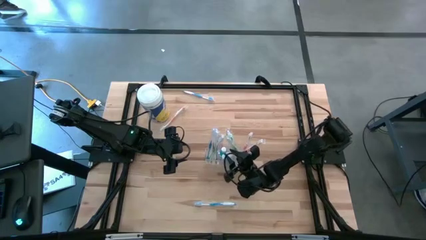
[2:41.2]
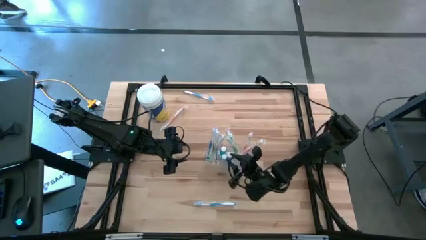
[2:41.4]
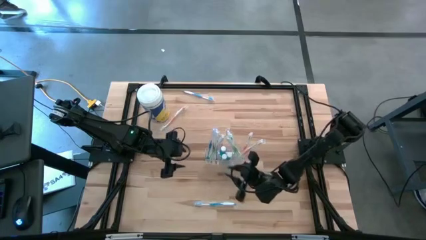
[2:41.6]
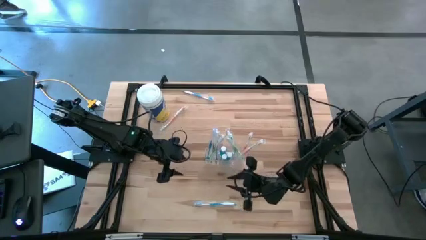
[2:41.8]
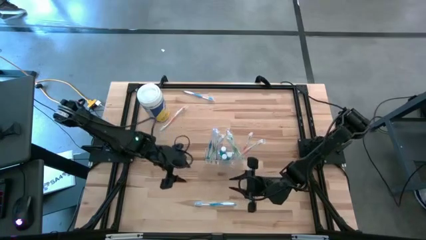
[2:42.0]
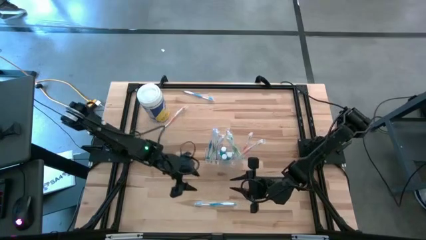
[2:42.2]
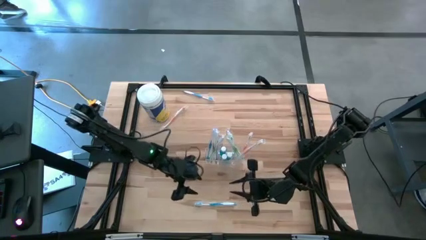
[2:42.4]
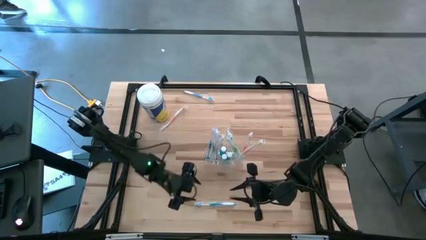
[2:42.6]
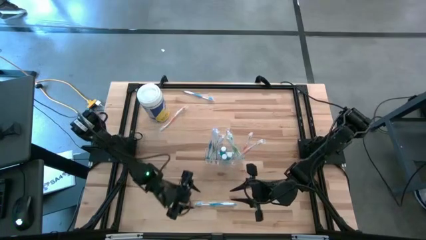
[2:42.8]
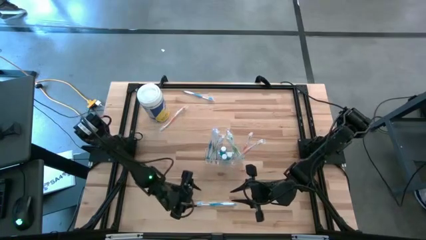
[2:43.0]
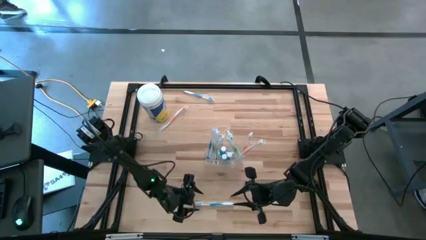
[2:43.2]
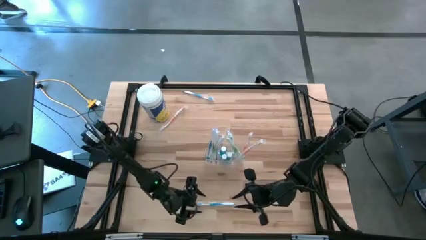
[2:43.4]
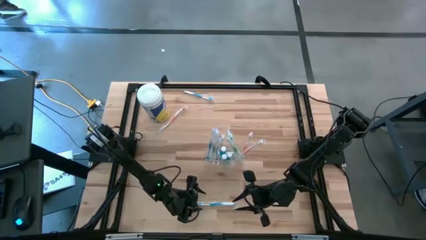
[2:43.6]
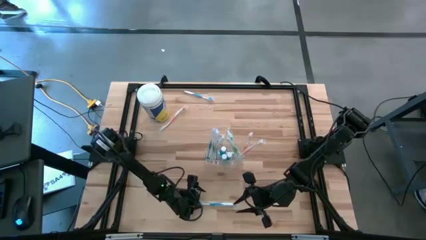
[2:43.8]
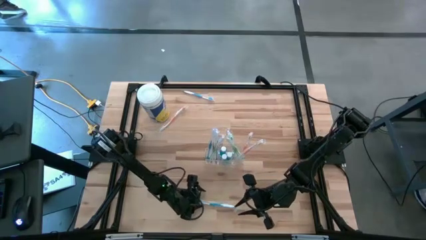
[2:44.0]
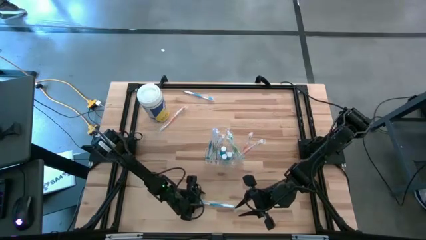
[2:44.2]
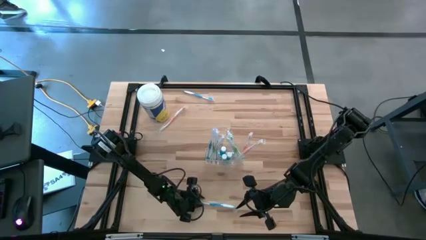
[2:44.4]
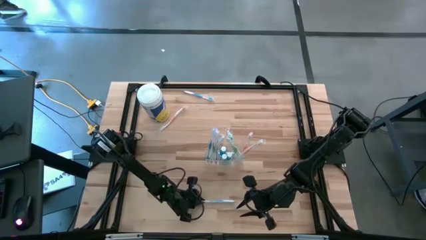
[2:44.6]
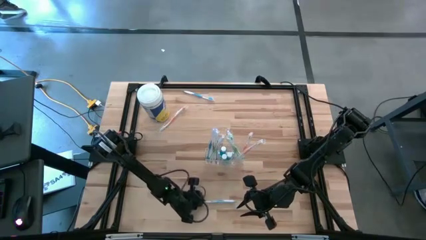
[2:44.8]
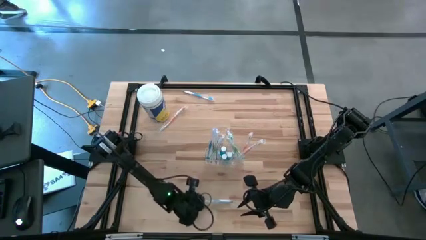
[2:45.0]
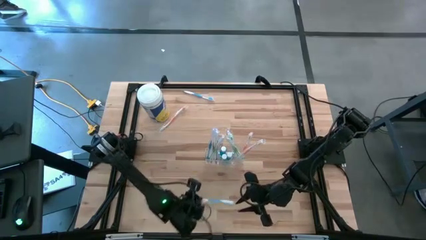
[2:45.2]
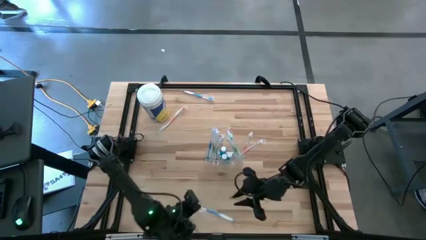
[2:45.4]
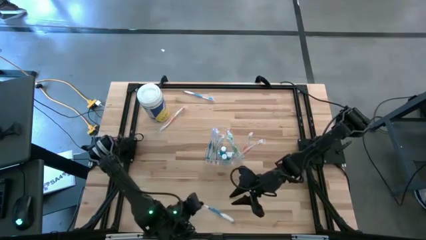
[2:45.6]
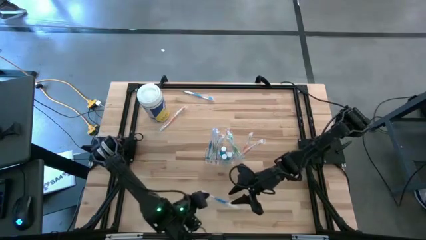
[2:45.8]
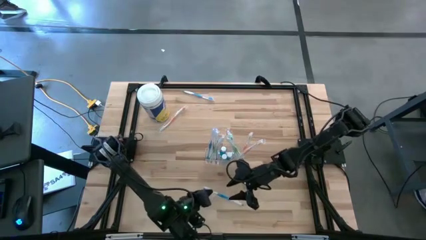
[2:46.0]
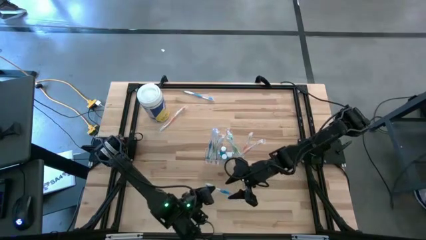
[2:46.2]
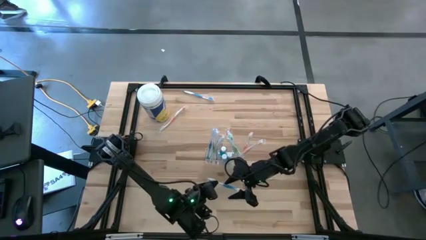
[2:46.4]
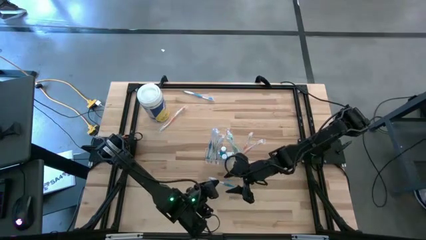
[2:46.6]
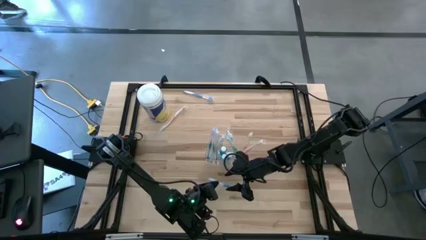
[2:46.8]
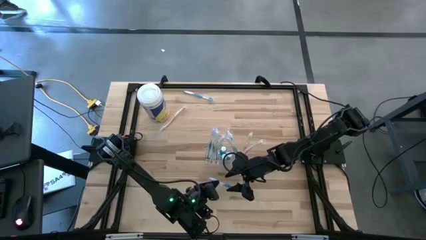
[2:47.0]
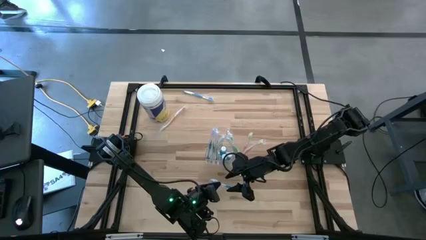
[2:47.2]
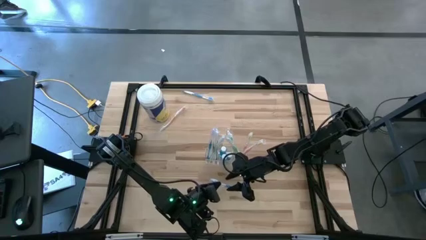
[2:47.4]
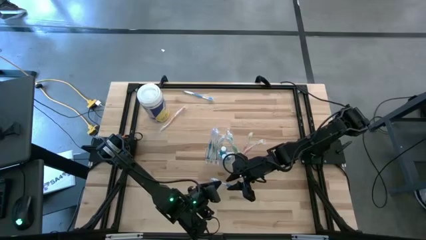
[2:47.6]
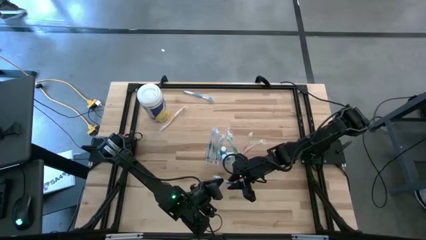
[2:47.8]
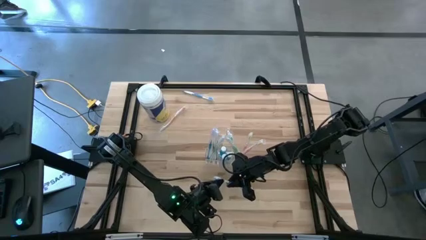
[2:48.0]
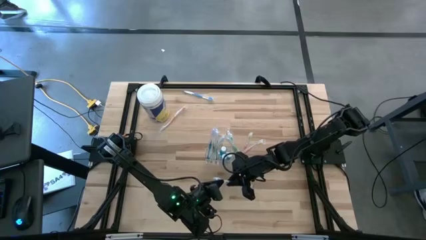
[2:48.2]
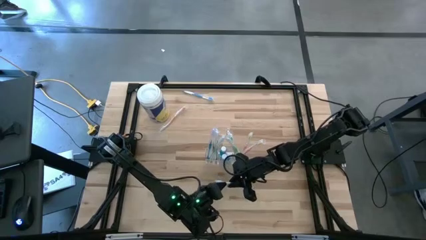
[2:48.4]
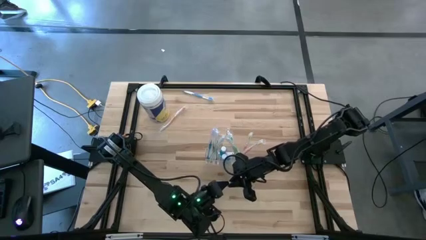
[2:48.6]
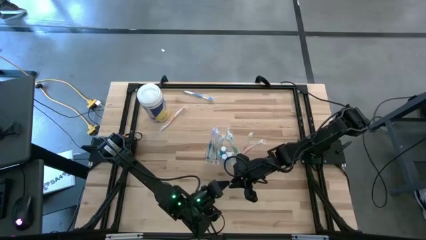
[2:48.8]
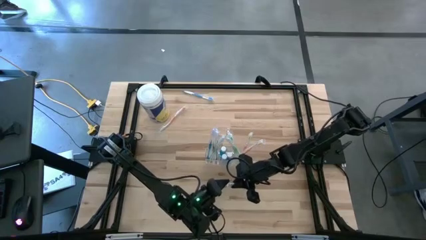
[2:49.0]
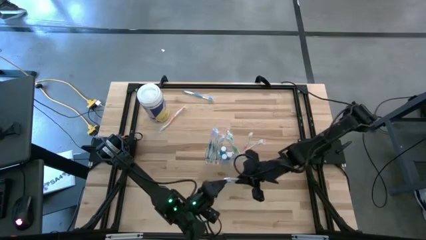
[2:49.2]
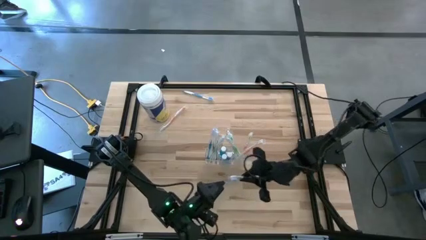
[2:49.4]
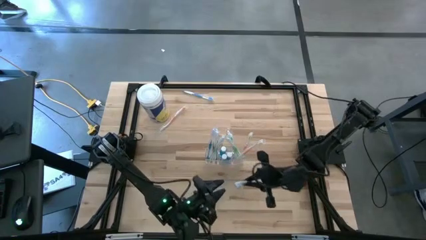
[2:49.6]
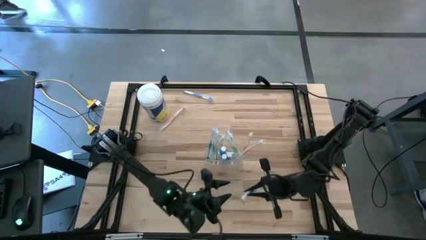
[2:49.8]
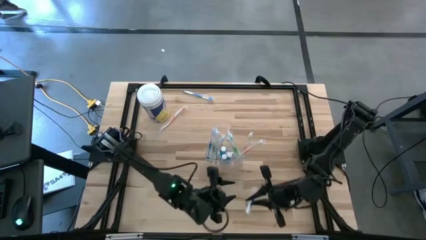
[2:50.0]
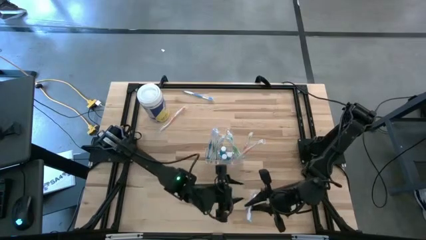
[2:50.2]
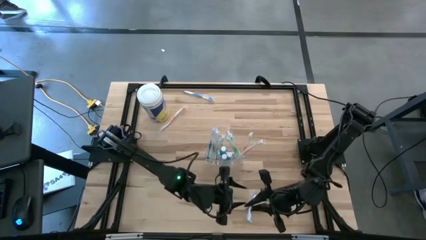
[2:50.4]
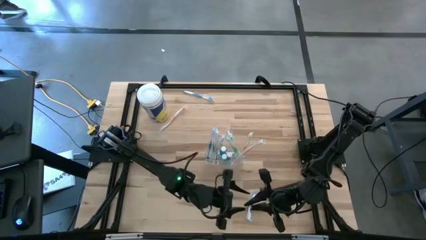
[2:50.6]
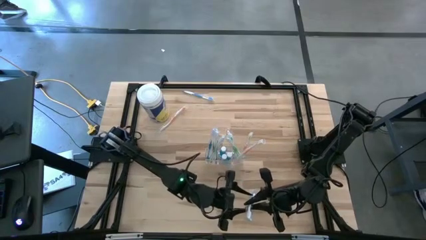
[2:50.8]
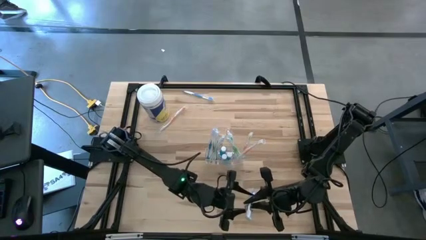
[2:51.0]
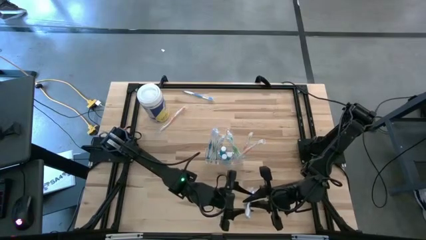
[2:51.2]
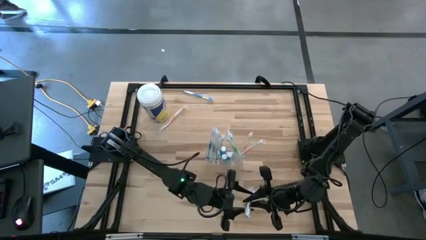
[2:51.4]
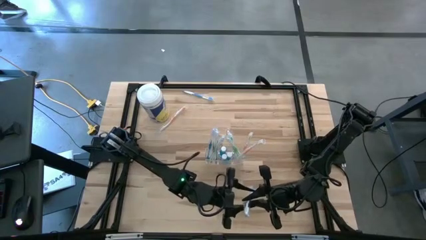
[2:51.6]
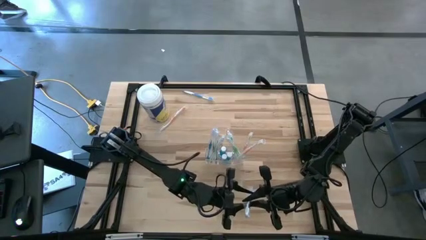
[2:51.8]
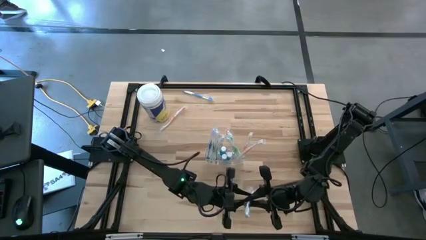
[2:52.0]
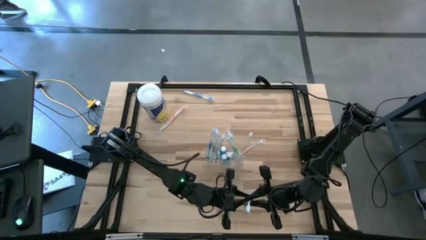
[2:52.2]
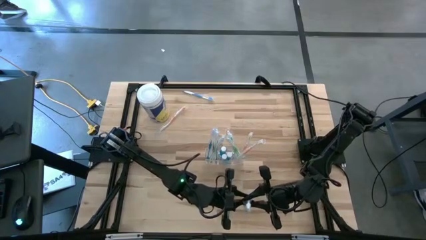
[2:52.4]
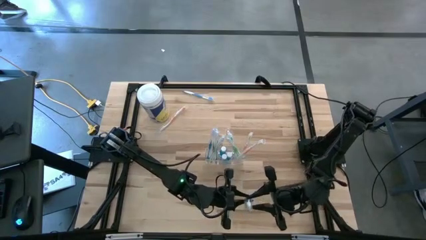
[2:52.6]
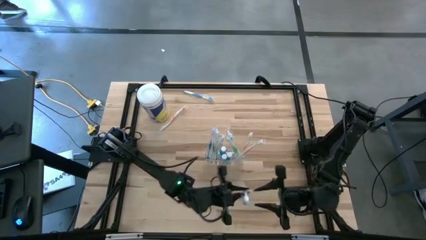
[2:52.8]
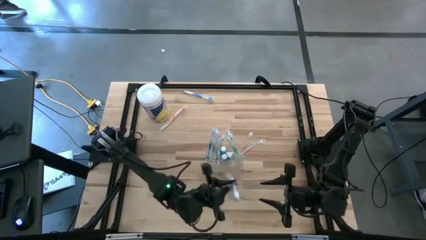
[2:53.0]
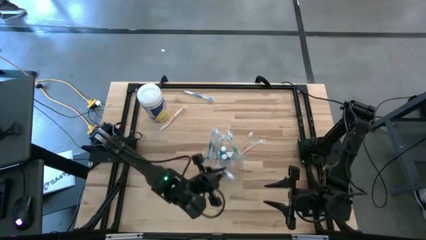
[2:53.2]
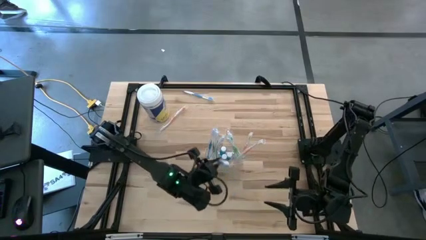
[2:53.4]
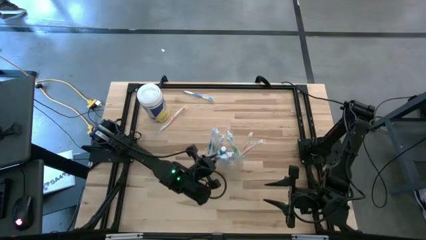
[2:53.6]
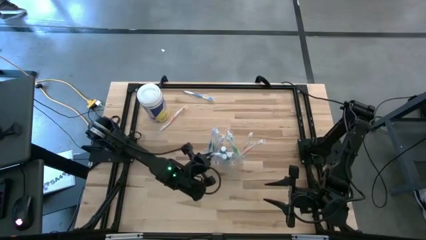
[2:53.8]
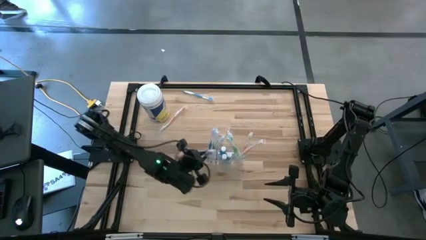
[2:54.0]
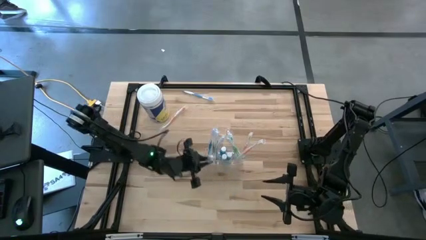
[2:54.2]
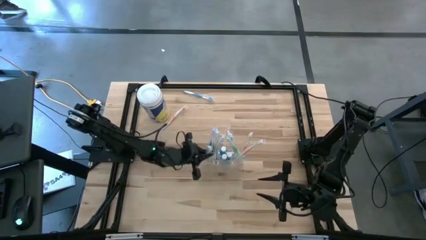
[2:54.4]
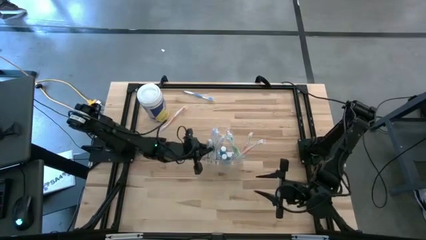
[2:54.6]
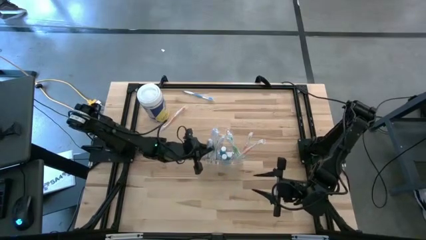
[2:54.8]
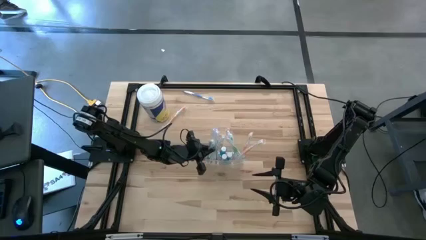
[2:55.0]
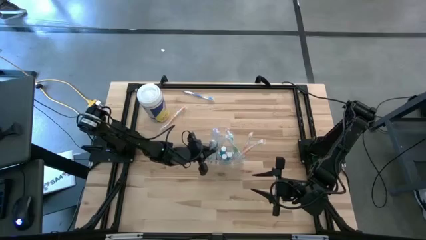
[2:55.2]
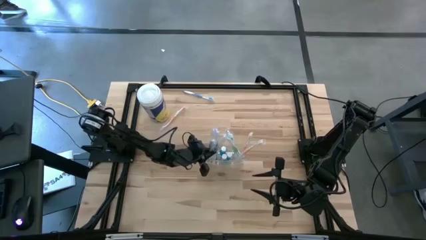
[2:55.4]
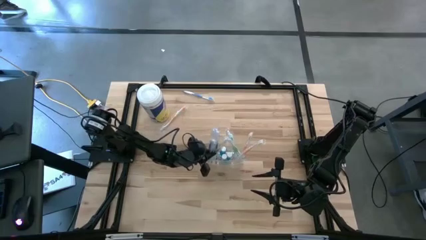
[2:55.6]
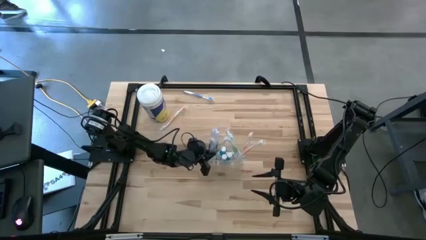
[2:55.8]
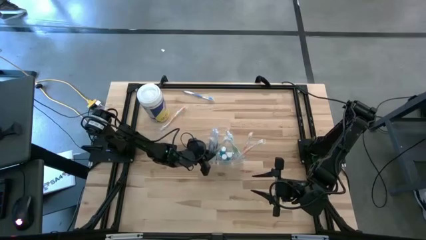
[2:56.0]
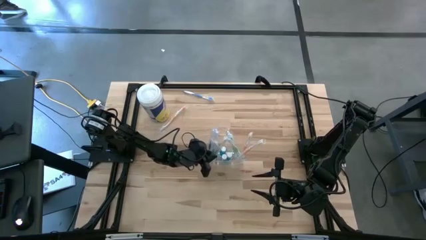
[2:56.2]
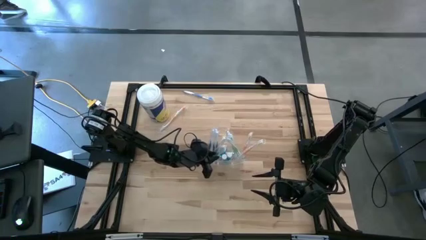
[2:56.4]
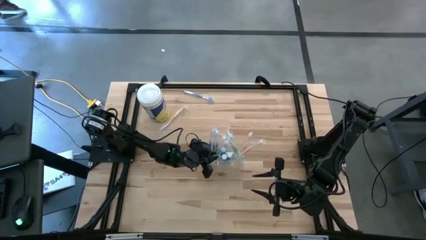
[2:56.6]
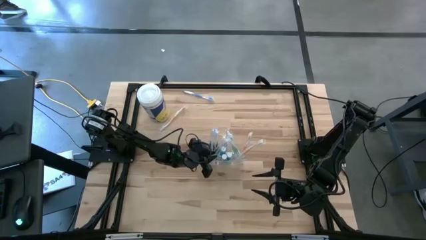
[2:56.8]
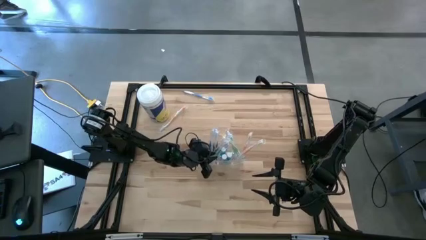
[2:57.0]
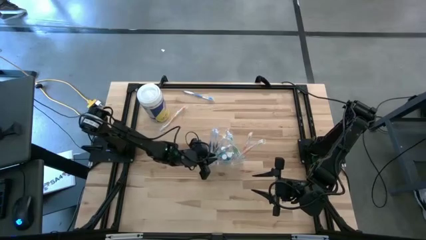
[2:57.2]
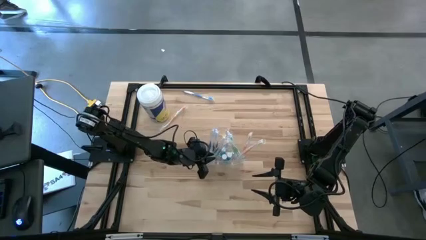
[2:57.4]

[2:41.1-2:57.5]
Task: Pick & Place toothbrushing station
Put the bottom blue toothbrush into the transparent organizer

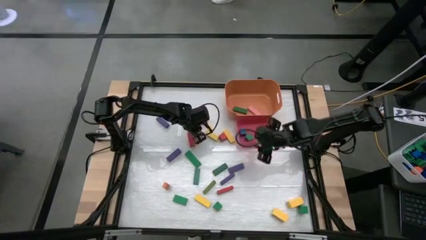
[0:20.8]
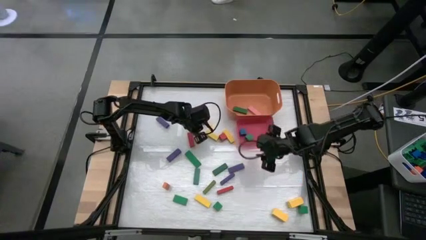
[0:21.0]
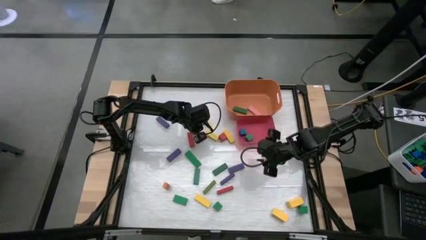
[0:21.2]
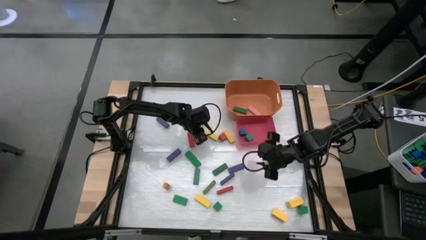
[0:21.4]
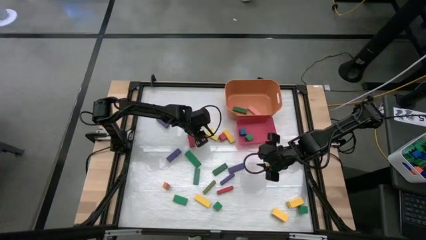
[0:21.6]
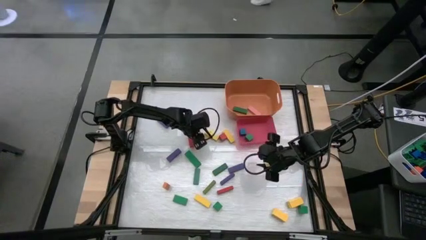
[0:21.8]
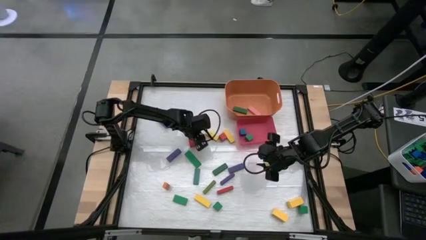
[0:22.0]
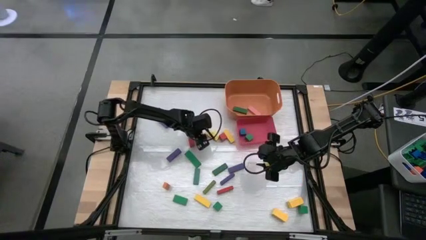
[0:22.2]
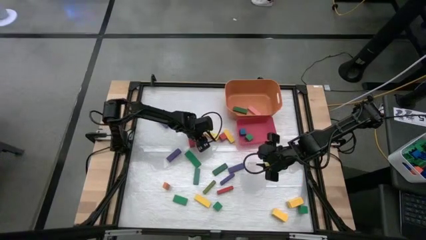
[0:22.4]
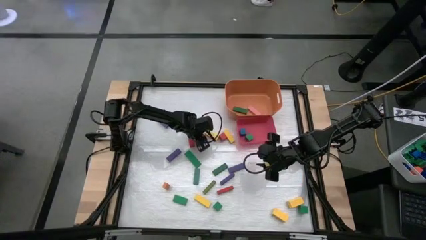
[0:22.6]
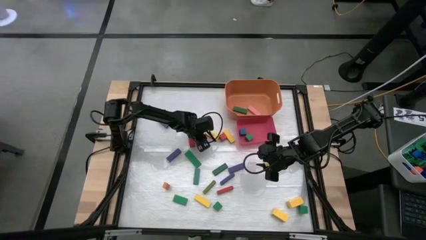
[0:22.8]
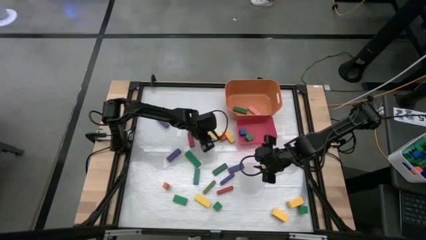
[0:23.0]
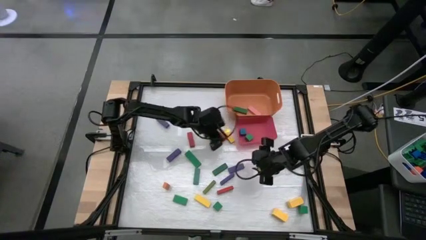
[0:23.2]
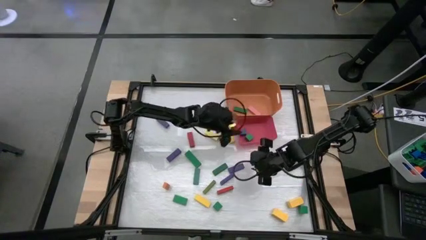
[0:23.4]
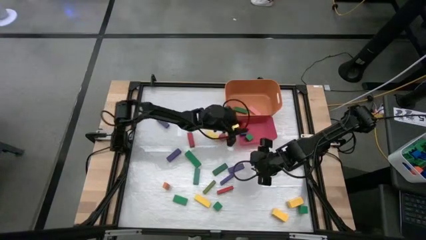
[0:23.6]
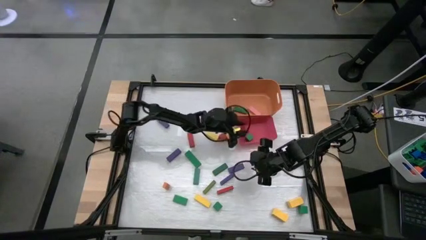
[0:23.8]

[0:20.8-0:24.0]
Task: Sort blocks by size
Put the red square block into the red bin
